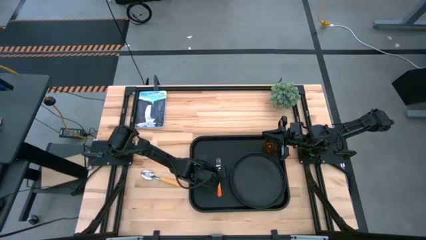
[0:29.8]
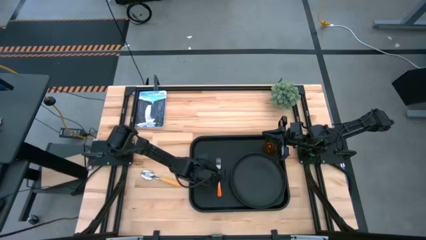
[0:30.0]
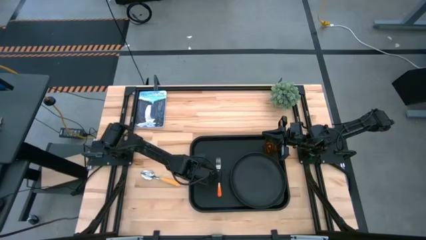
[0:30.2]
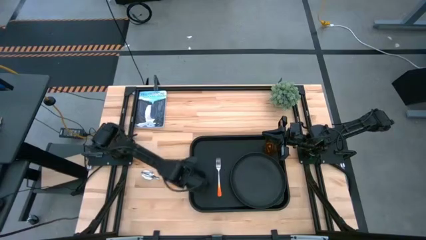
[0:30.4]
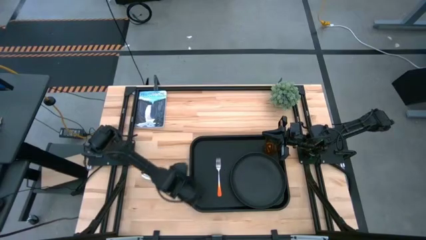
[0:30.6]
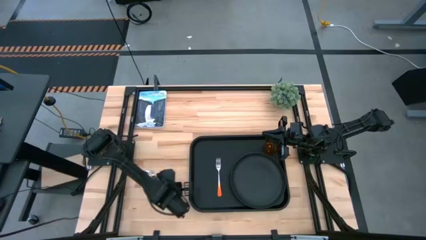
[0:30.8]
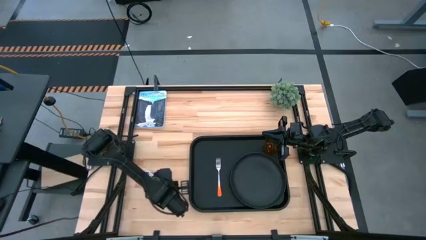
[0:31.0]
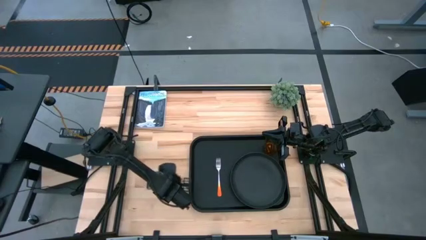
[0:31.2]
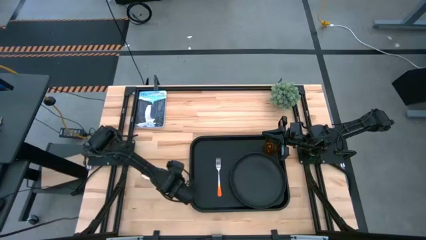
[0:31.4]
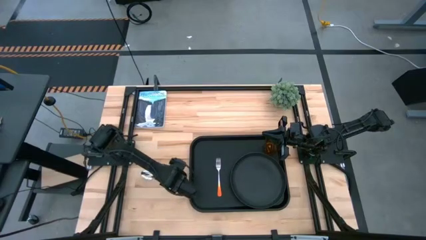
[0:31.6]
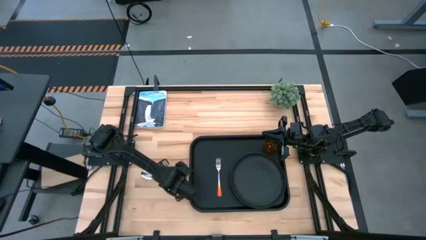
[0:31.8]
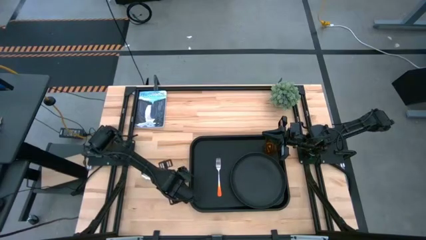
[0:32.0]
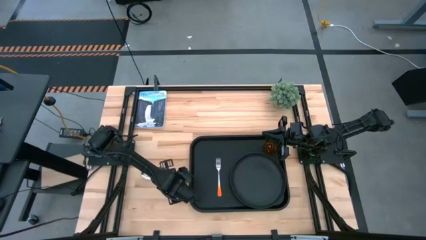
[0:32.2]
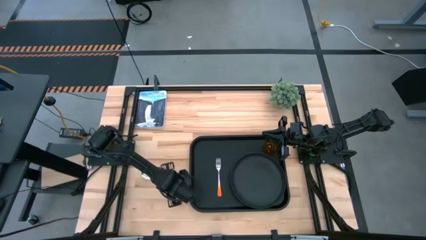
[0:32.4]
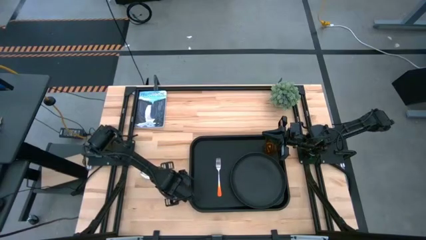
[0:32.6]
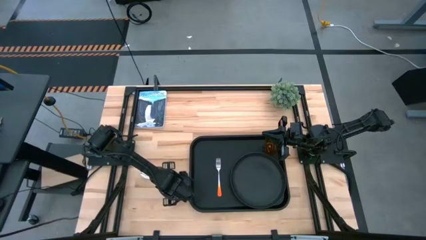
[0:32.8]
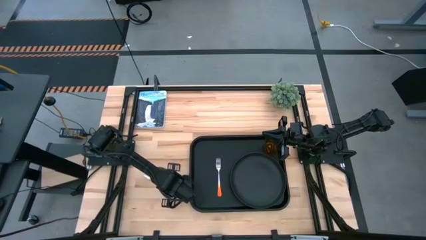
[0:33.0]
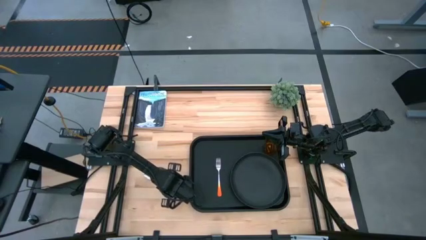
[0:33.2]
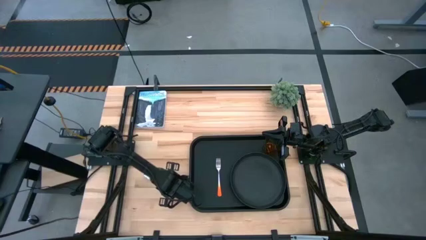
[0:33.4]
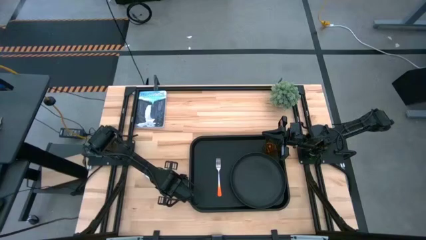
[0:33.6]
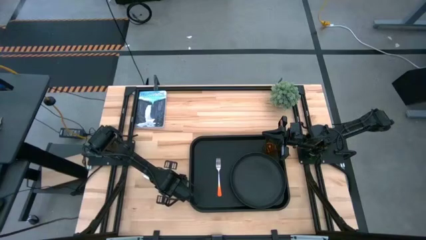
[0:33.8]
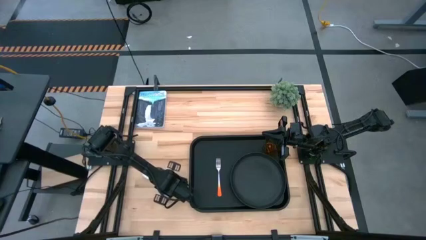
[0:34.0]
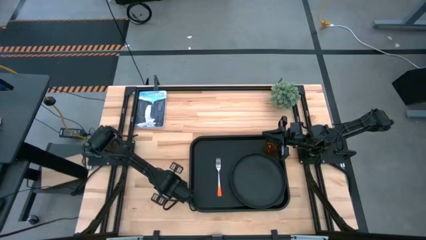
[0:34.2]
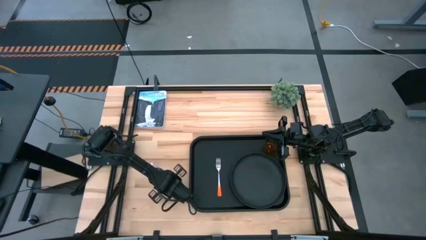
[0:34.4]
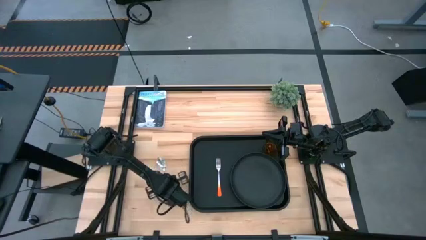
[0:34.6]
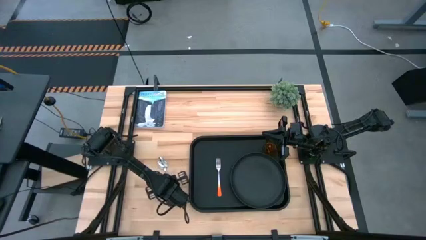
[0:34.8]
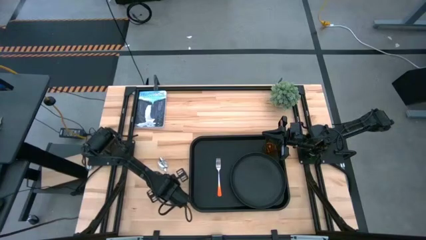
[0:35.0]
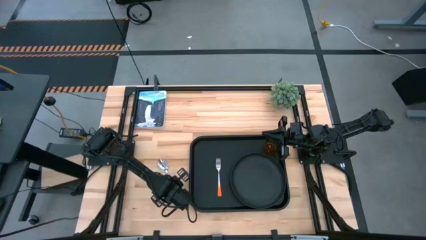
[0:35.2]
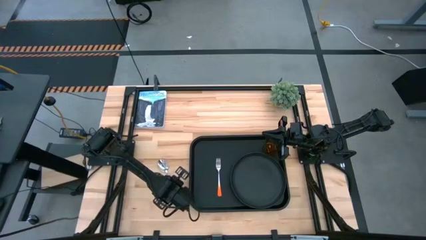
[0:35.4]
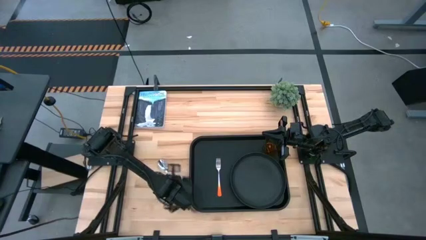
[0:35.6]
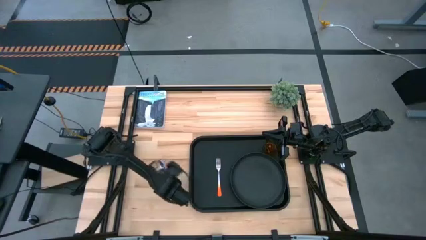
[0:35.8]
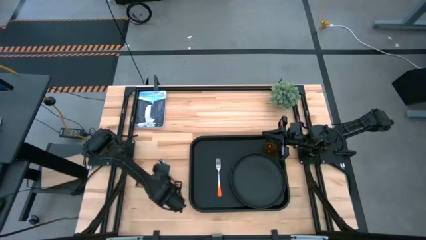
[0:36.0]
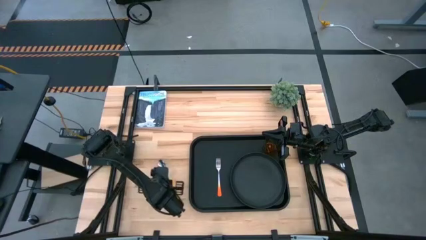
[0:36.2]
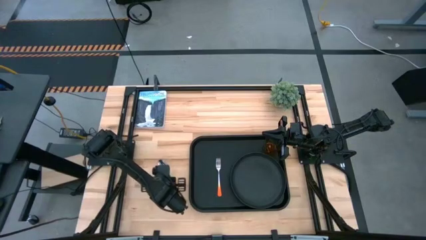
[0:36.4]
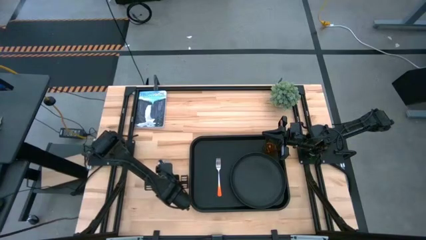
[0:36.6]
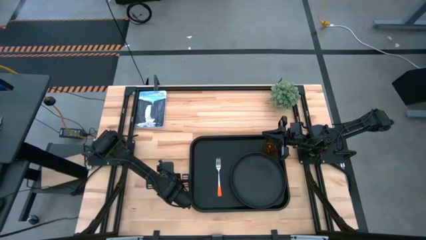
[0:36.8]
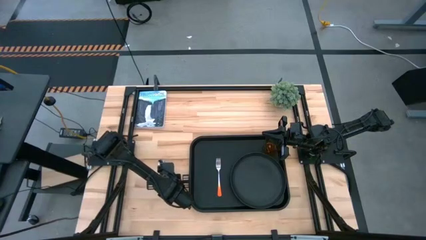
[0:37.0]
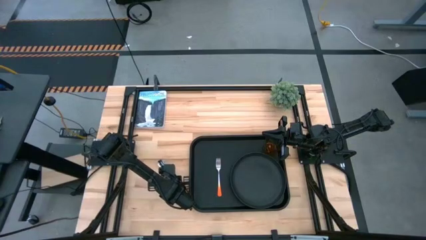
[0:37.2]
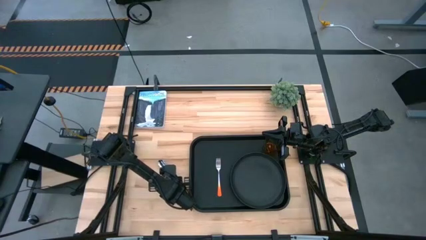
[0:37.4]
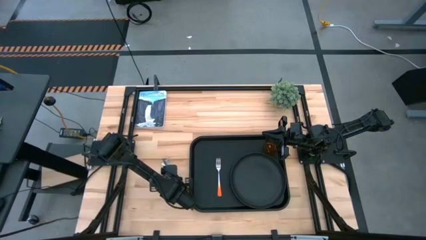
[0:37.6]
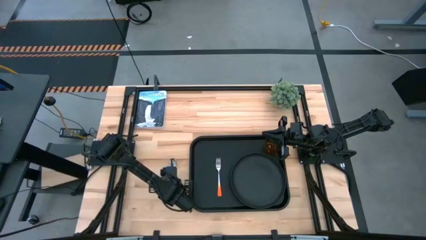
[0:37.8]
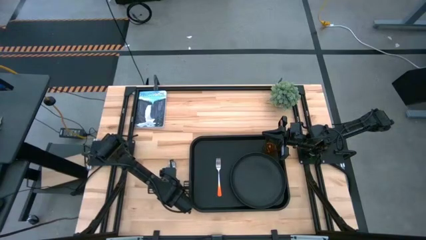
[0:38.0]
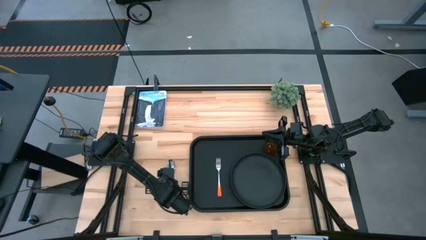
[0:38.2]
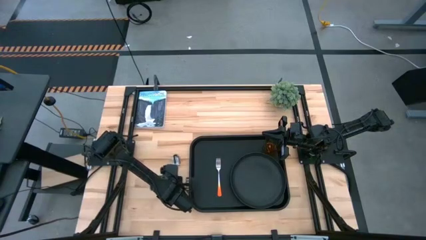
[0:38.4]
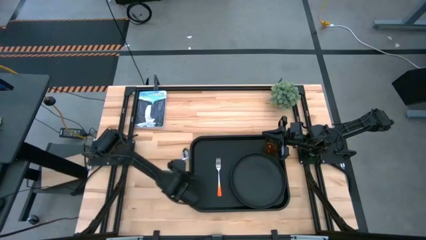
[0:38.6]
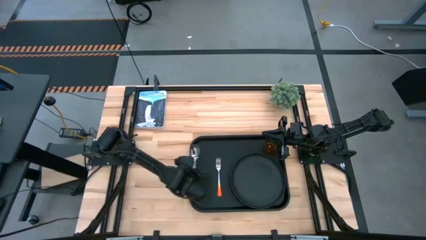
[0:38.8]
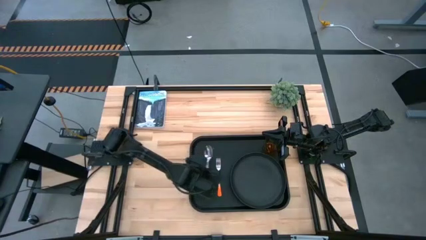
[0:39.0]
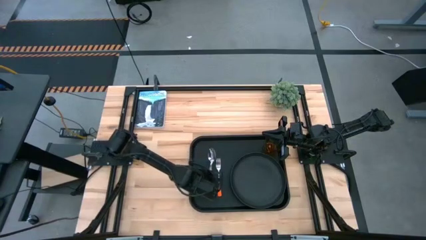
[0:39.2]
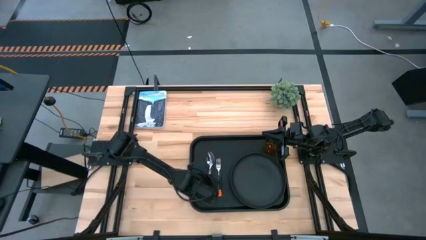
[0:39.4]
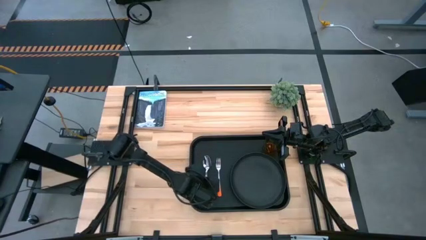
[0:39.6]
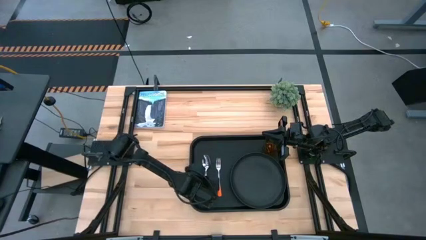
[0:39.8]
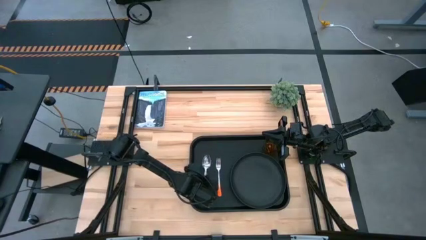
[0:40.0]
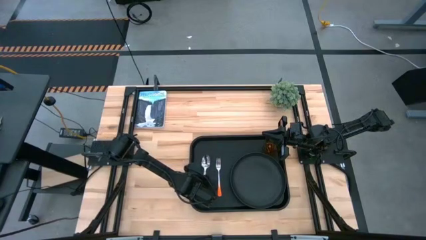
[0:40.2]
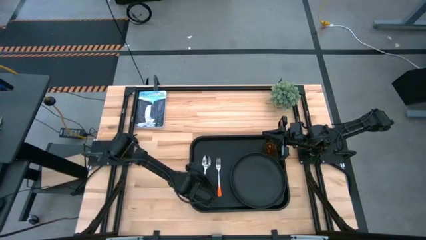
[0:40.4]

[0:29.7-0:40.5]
Task: Pick and place plate/cup/fork/spoon on tray
Put the yellow spoon to the left of the orange fork on the black serving tray

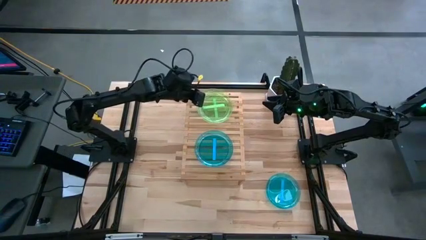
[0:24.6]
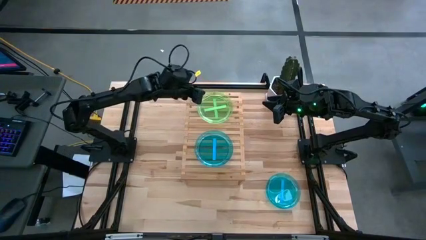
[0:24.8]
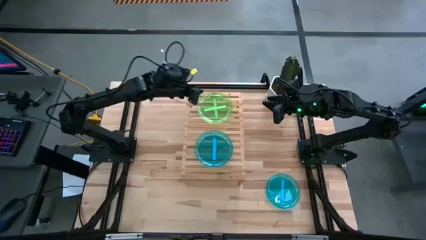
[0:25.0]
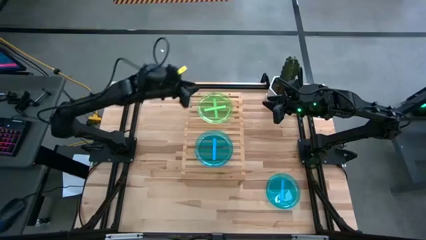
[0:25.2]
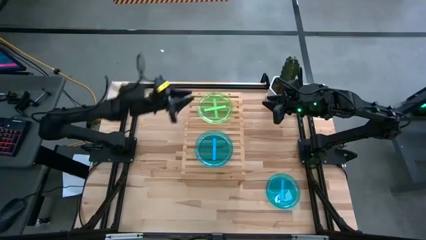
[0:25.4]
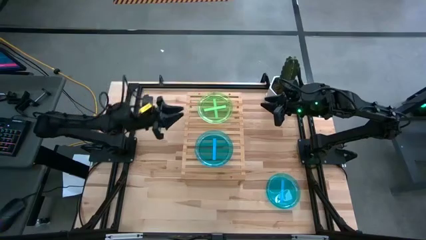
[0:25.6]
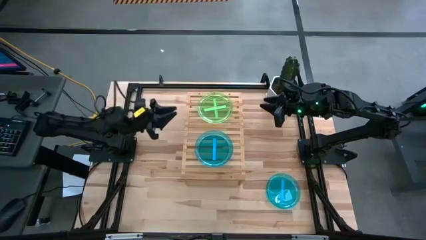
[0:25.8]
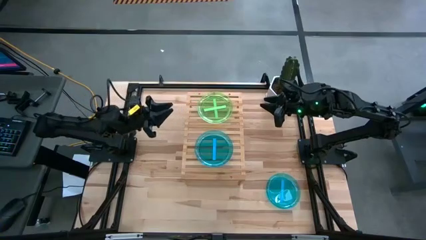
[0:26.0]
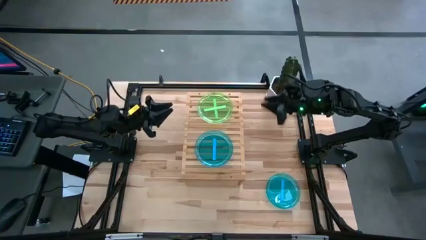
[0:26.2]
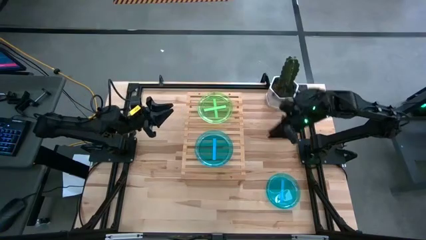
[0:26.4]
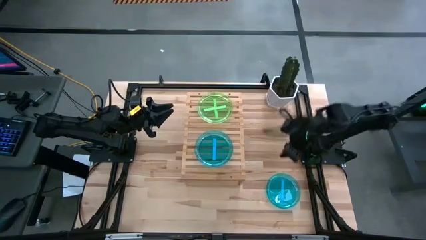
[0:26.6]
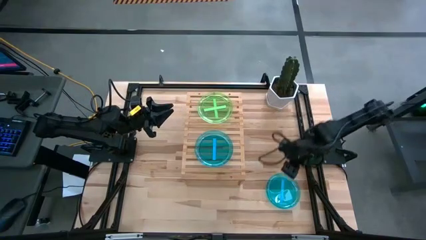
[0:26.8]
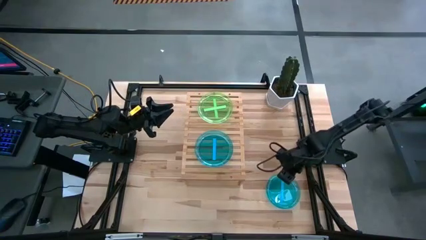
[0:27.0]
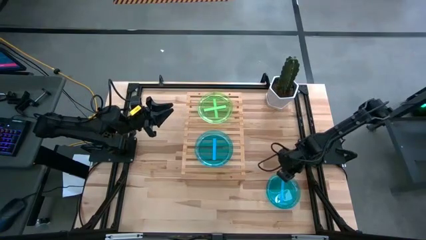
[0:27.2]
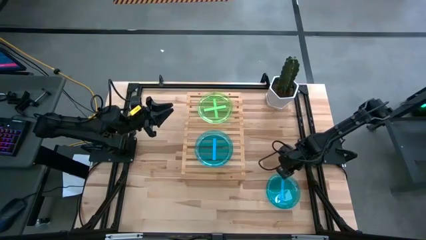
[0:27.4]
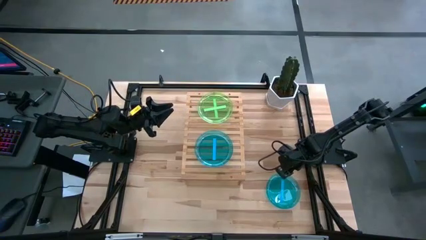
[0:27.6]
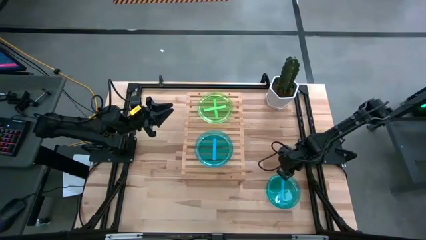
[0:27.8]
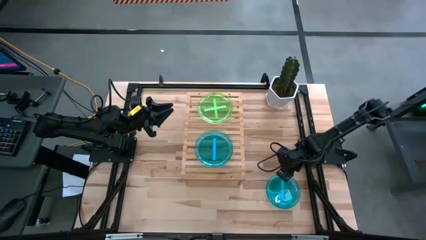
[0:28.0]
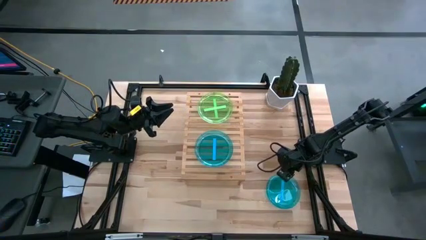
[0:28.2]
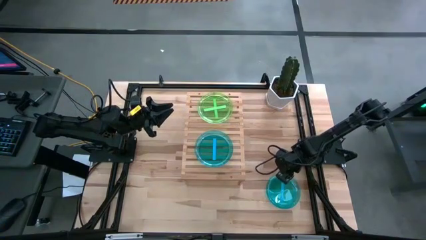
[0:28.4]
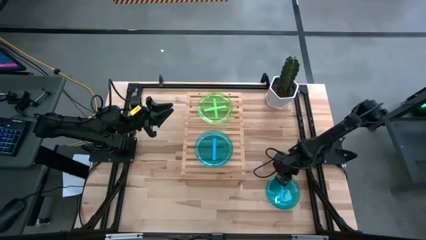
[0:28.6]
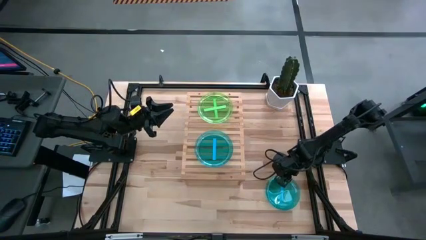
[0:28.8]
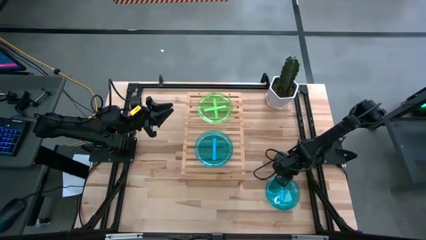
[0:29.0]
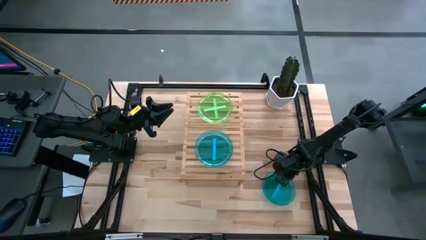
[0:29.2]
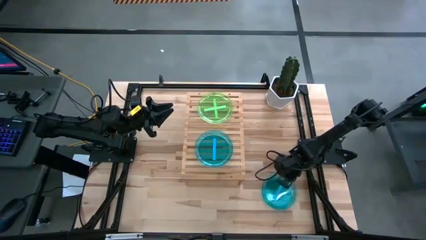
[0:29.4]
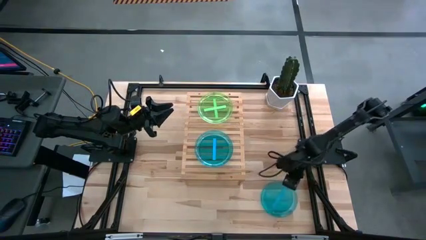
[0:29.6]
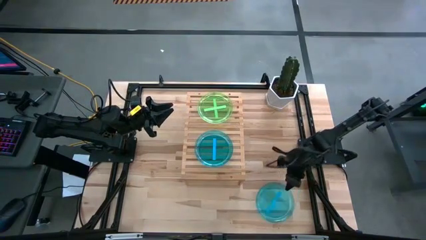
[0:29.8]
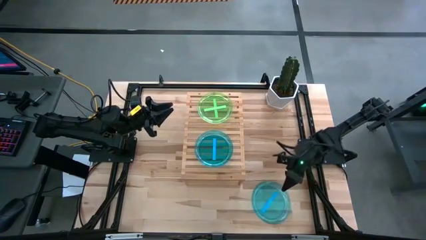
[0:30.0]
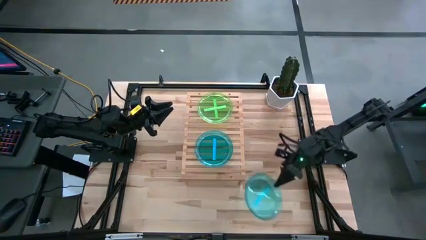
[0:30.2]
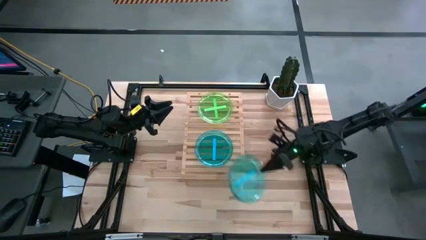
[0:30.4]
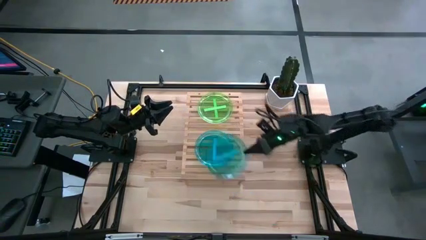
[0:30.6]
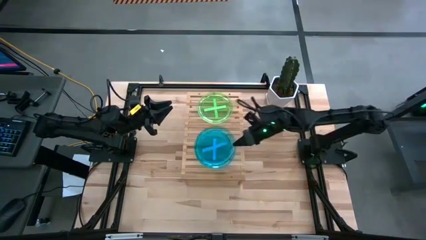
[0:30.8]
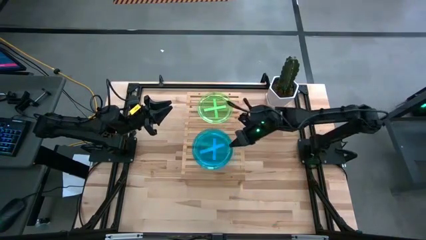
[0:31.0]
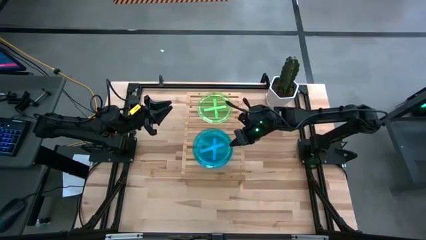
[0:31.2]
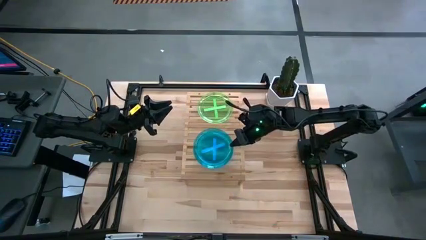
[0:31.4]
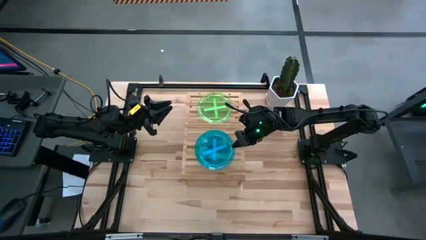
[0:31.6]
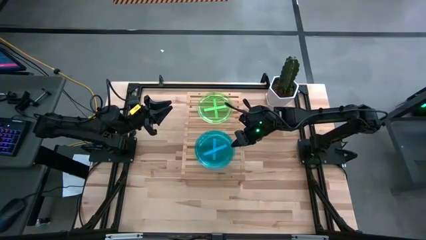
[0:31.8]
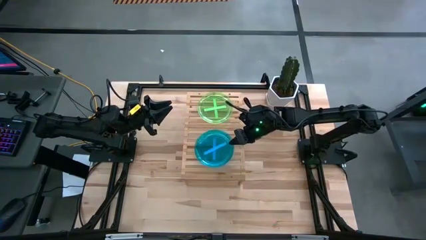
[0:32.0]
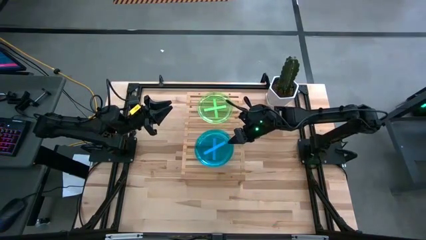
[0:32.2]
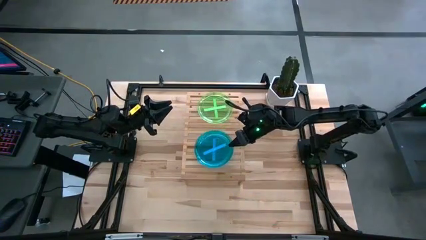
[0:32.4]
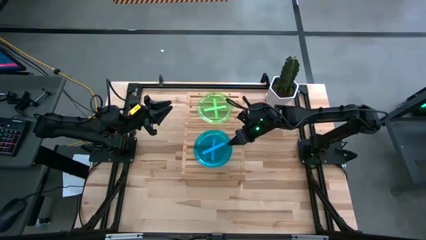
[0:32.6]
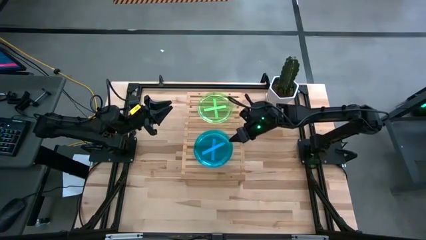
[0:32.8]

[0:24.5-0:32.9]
Task: Place and stack plates onto a shelf
Stack the blue plate on the blue plate on the shelf
